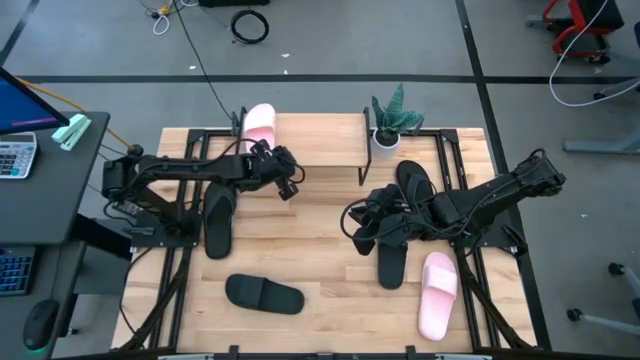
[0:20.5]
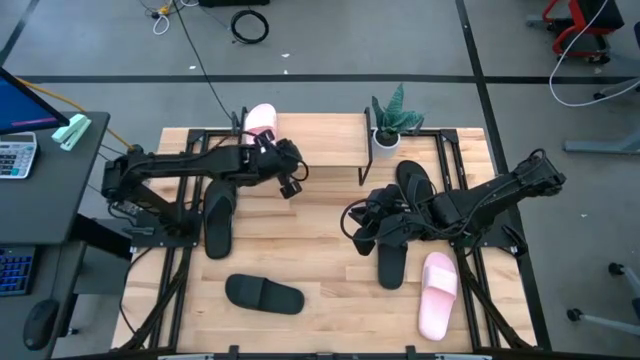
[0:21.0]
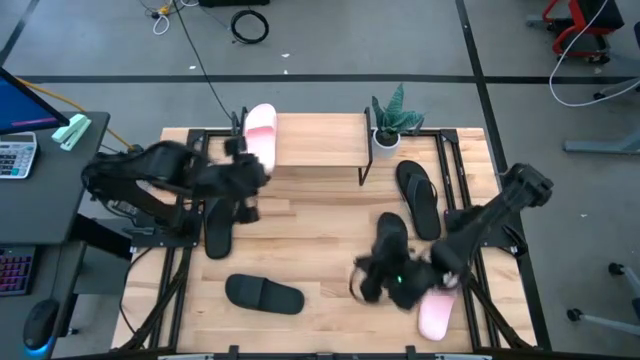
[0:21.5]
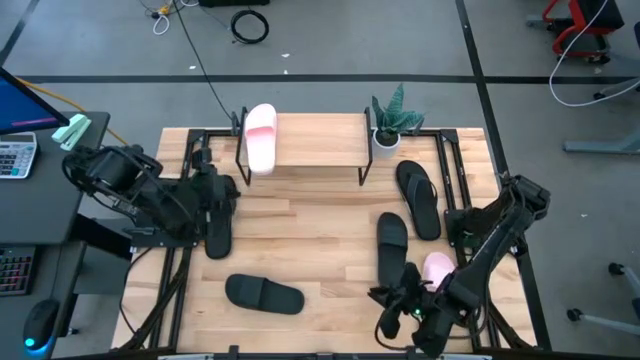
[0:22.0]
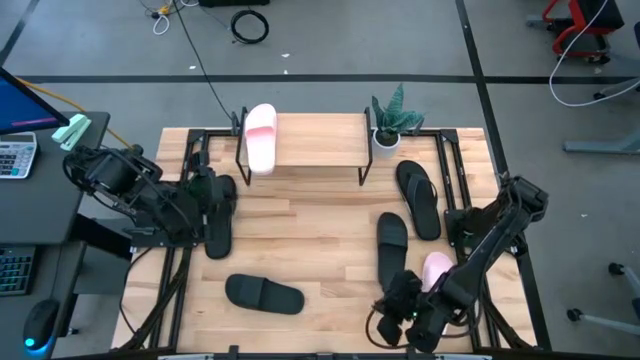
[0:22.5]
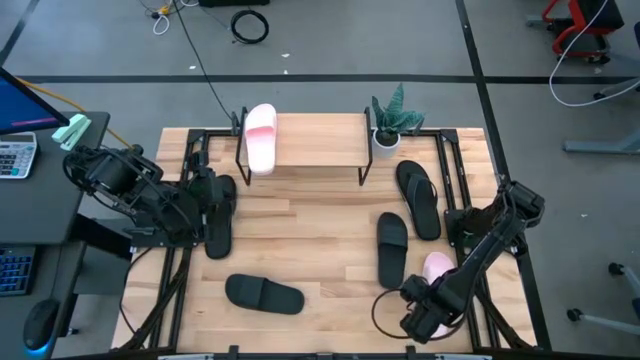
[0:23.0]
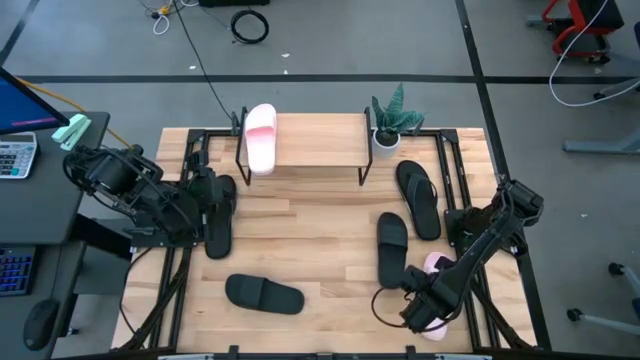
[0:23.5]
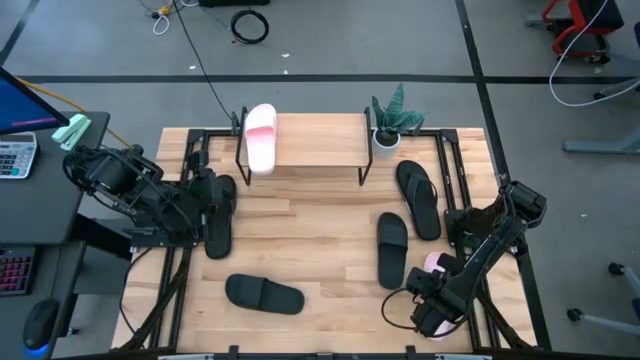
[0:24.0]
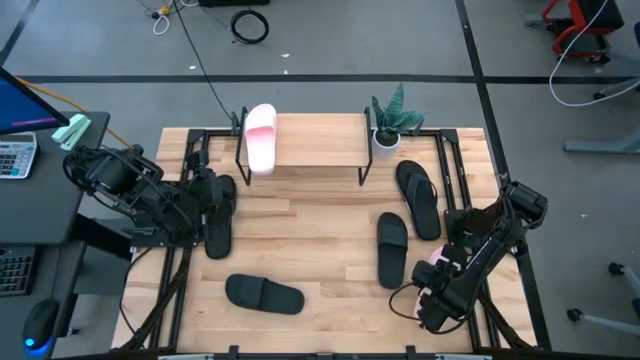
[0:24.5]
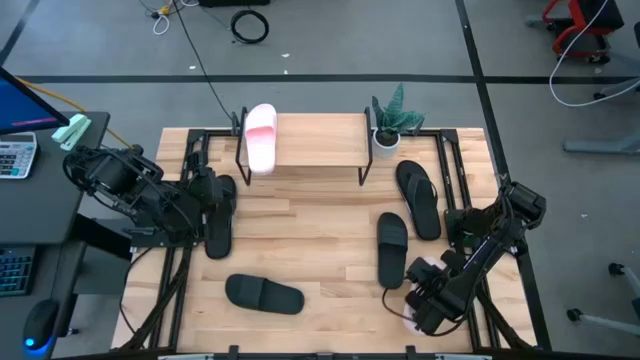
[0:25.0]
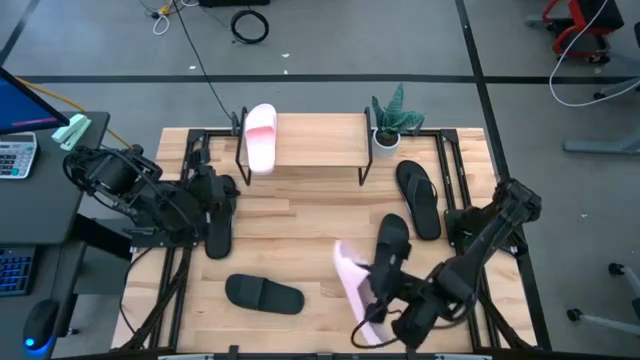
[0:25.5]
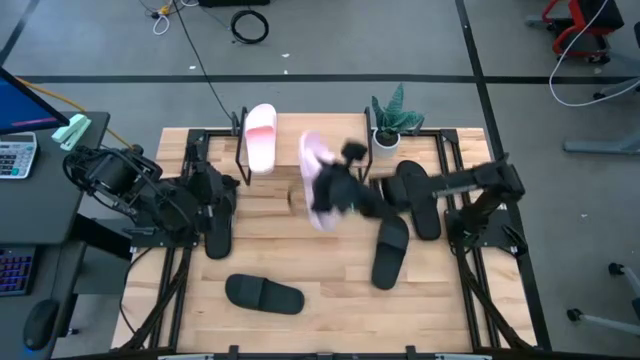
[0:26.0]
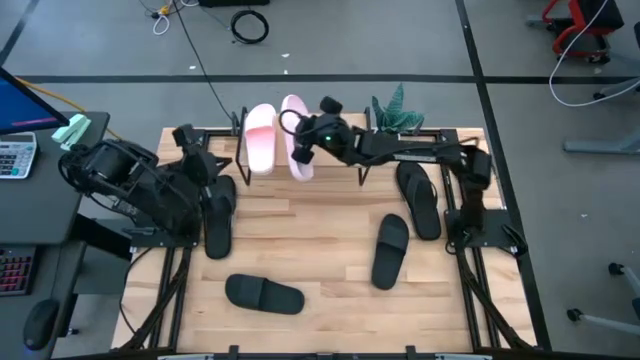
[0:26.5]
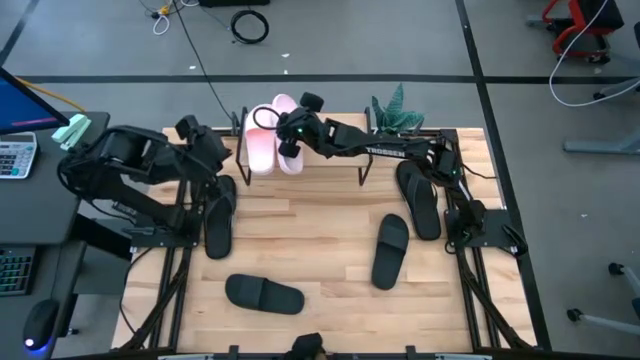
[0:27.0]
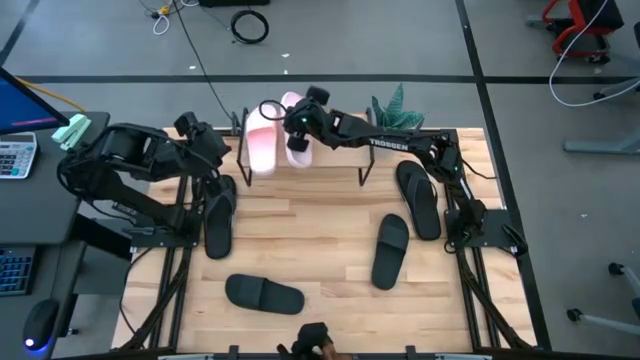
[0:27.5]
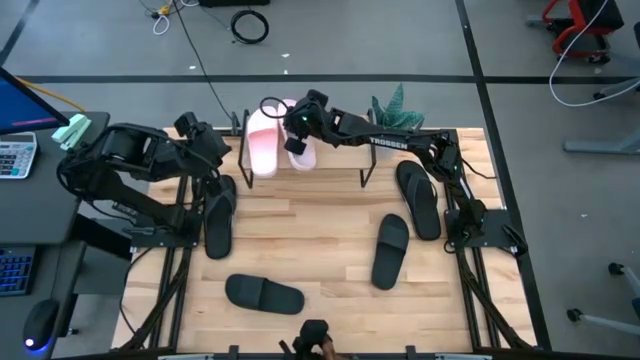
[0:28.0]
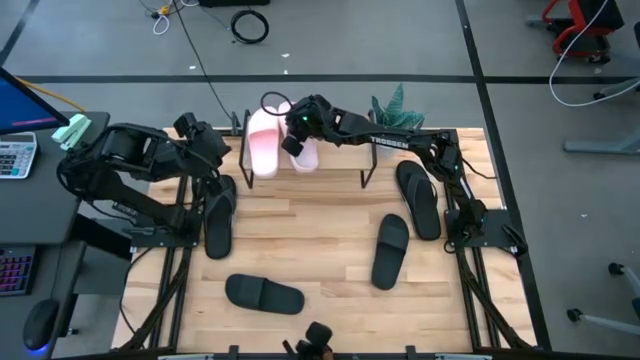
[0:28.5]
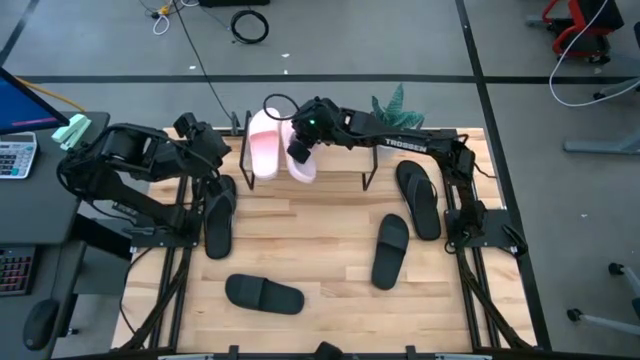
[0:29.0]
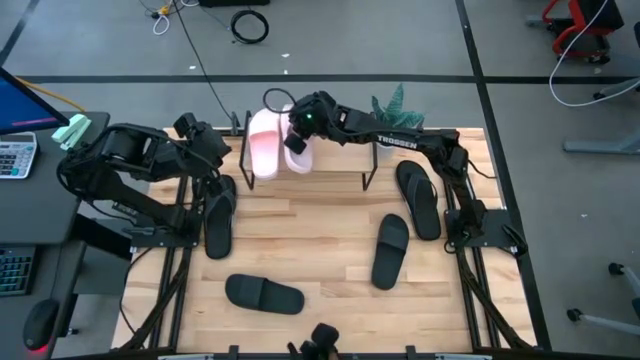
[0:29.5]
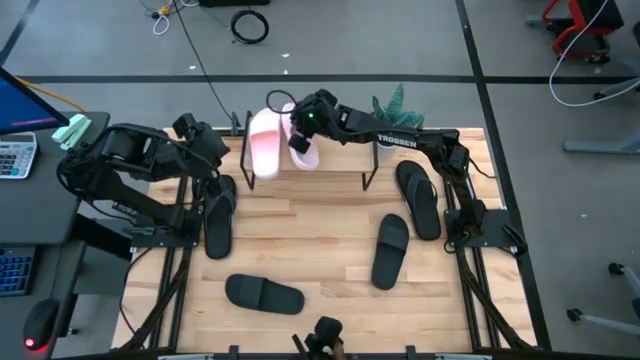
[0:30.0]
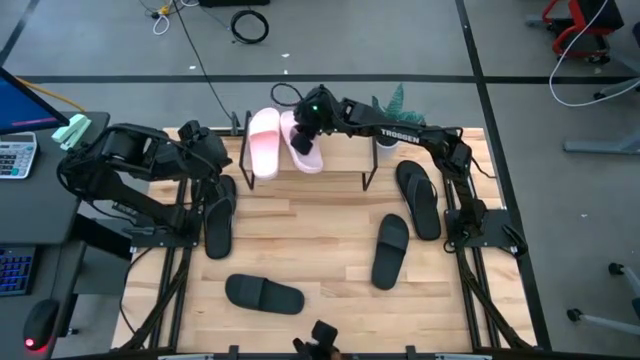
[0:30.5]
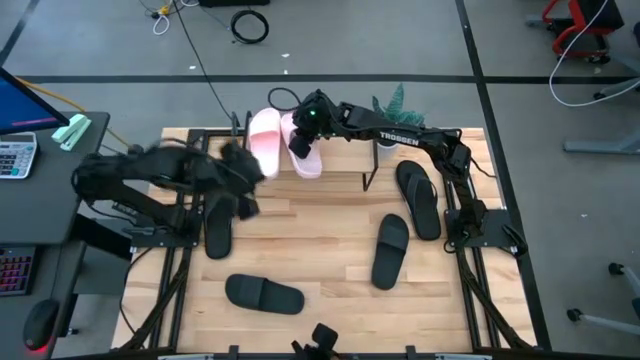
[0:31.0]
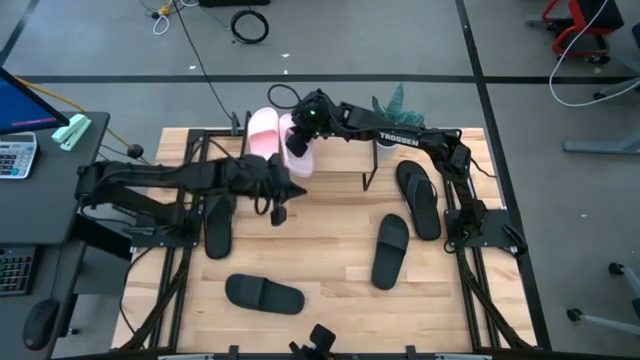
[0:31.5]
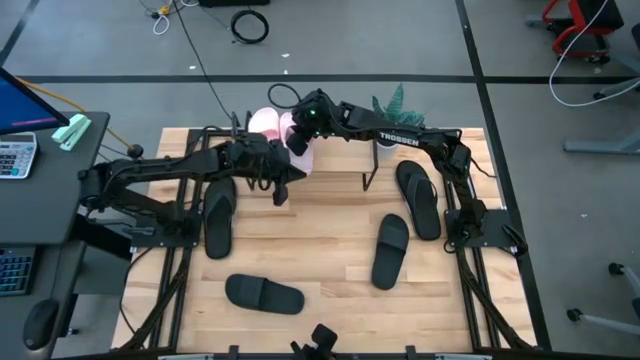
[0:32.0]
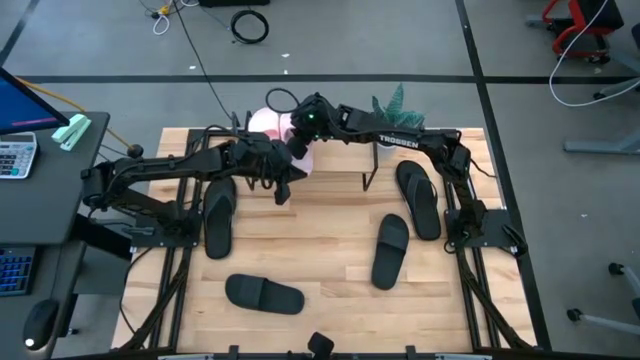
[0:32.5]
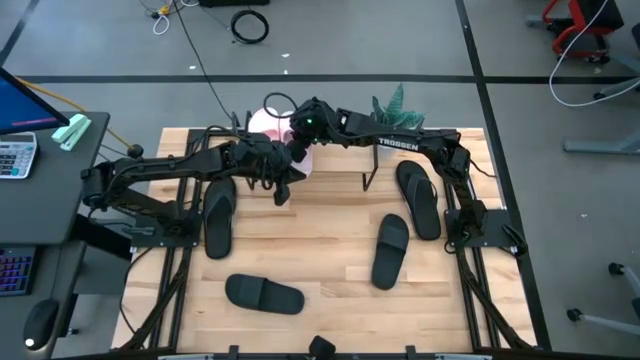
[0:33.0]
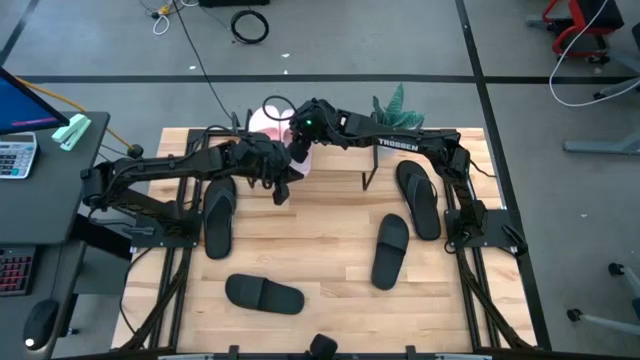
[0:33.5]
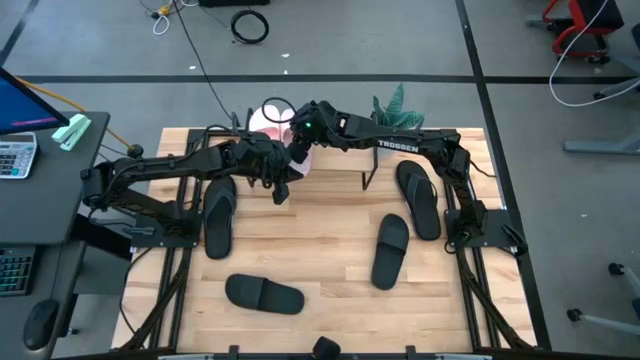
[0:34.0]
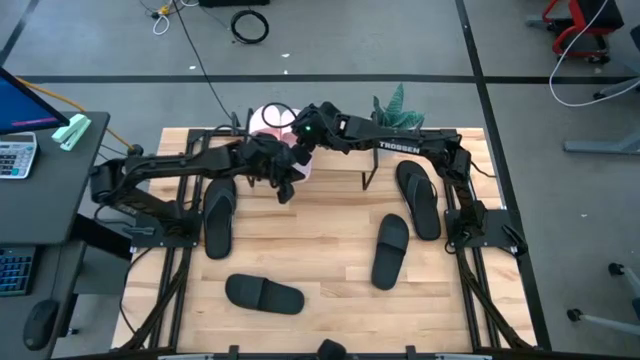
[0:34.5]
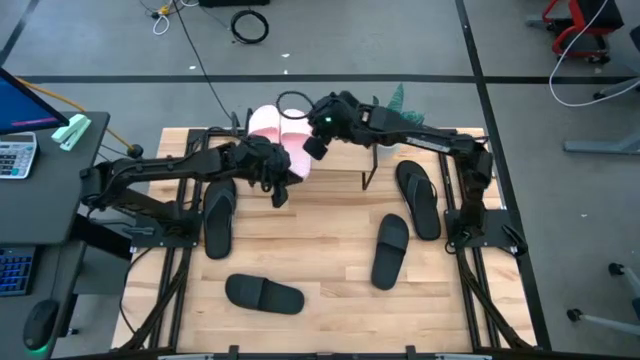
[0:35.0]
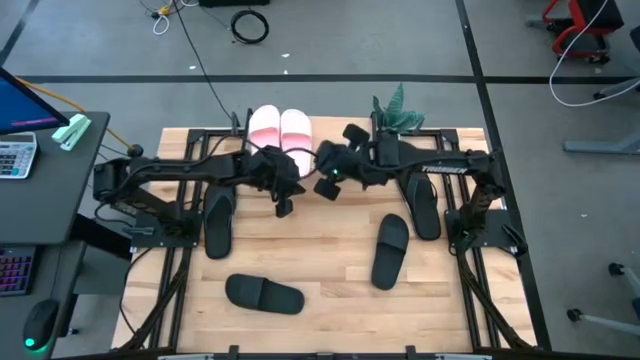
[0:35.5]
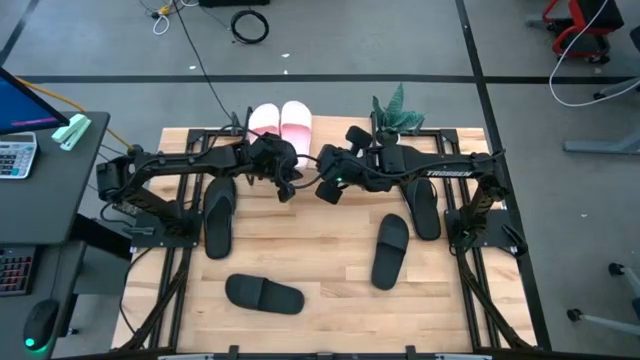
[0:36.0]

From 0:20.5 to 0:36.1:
Task: Pick and place slides into the shelf
Put the pink slipper on the shelf

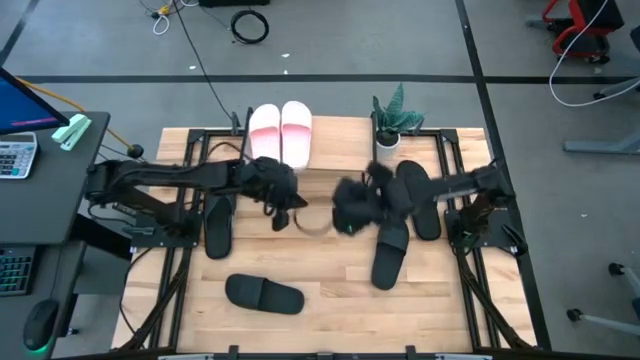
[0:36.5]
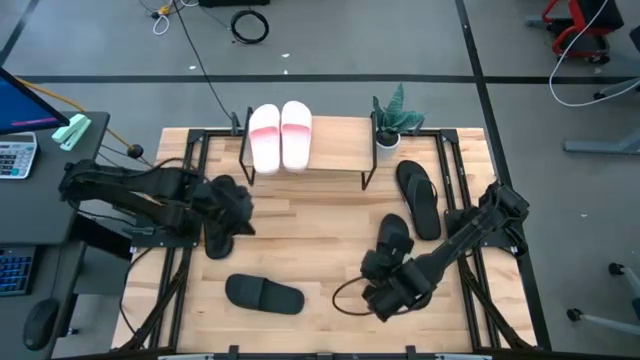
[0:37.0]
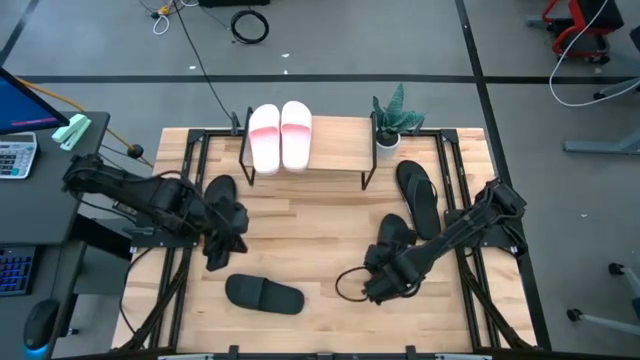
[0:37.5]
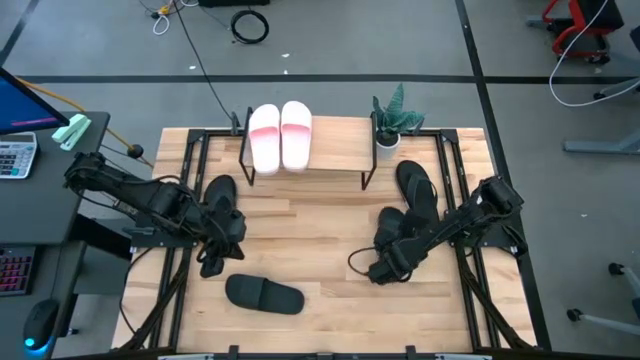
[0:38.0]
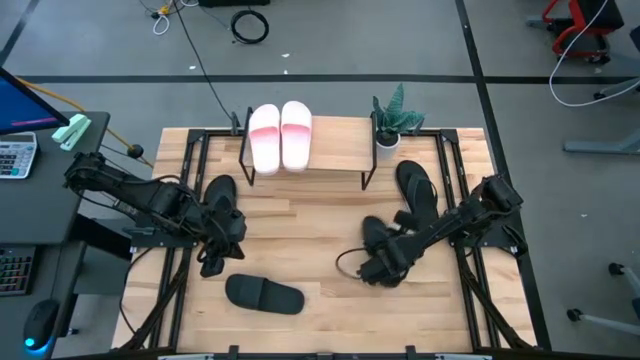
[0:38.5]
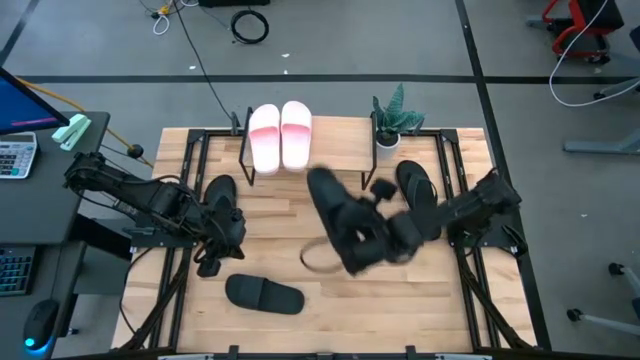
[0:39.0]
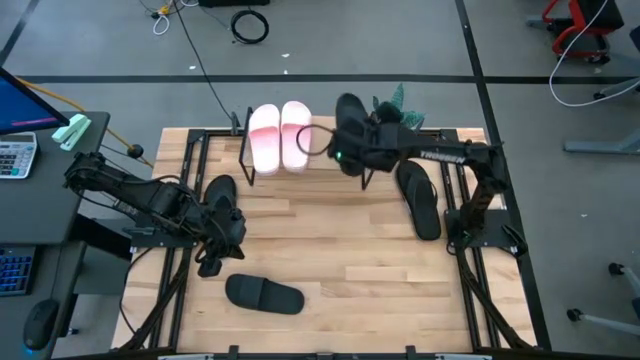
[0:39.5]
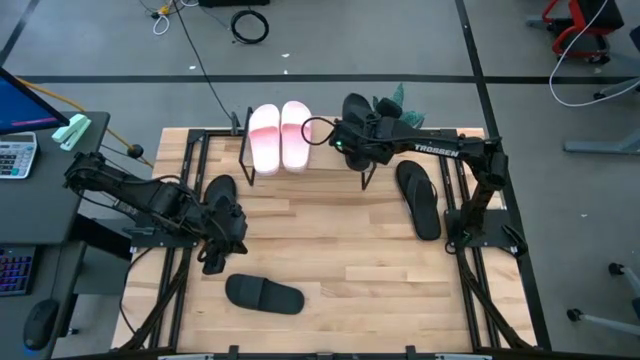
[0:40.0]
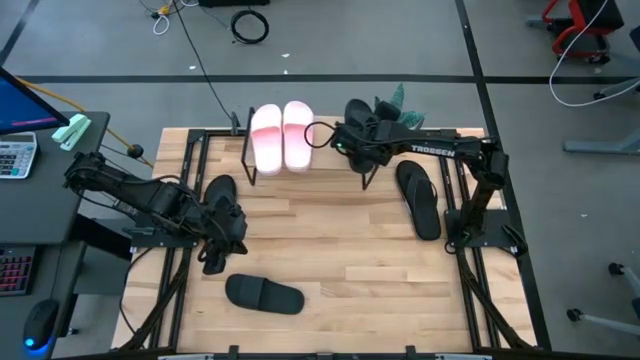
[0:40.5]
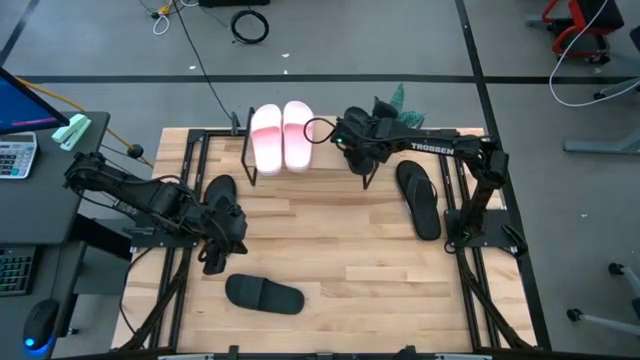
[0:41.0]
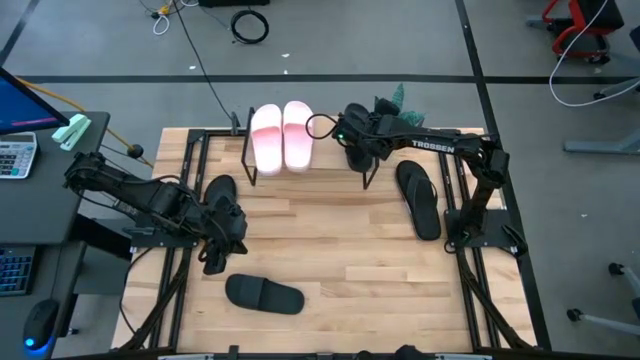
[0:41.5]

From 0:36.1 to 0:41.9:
Put the right black slipper on the shelf
